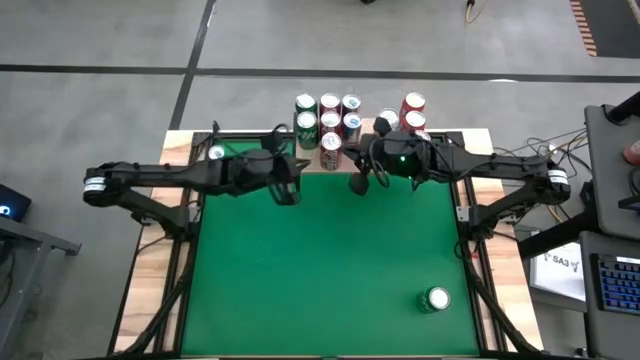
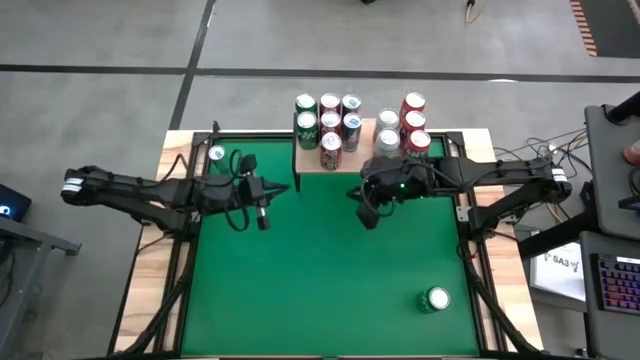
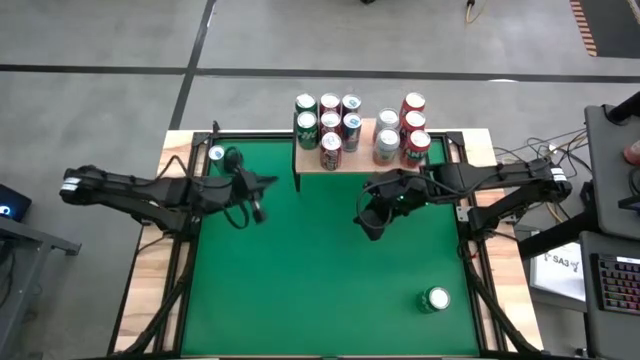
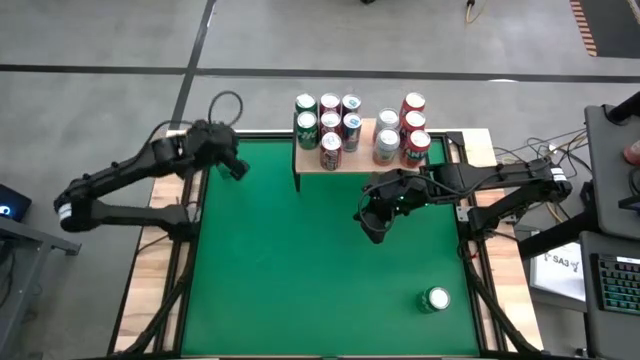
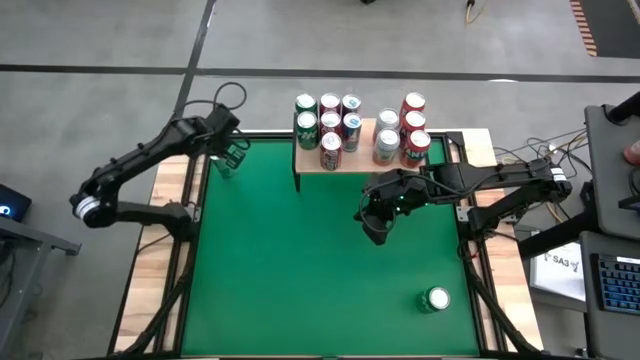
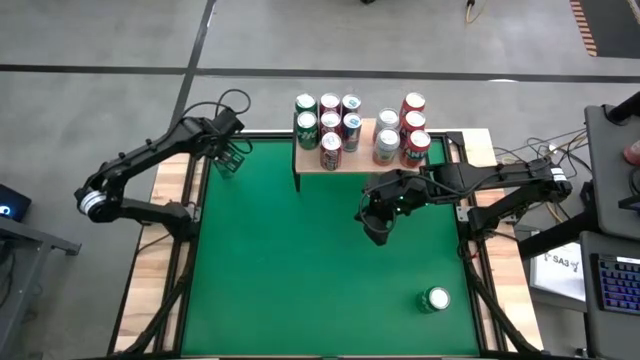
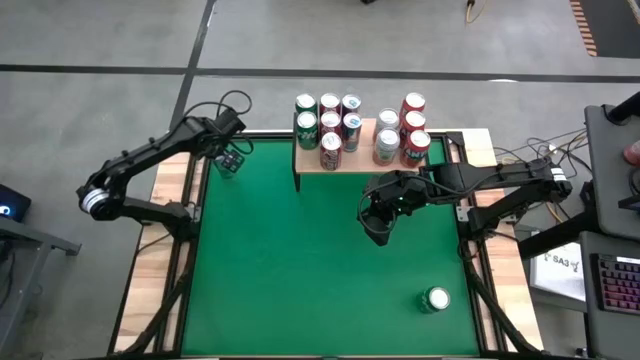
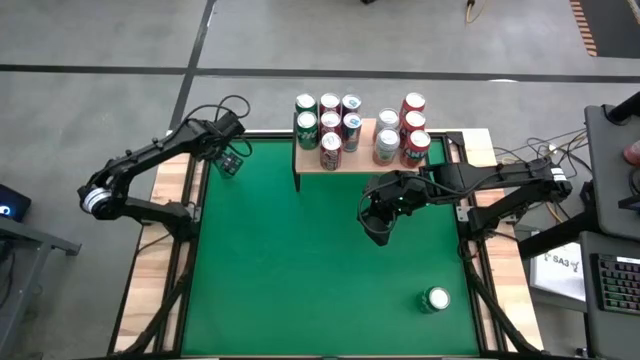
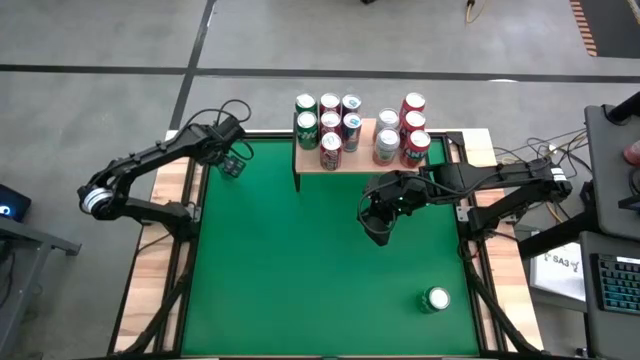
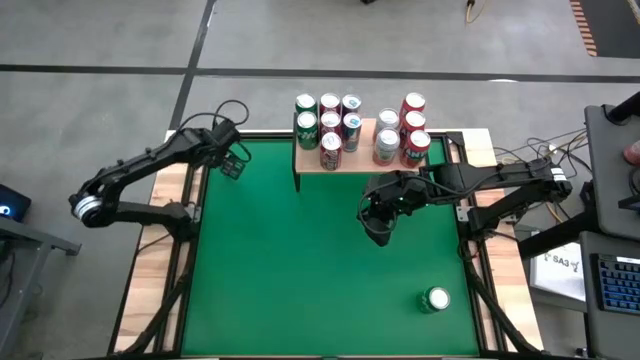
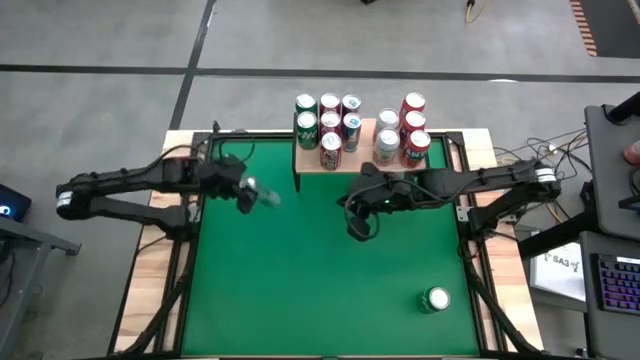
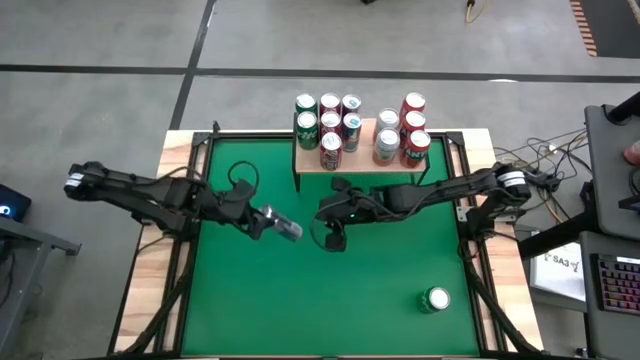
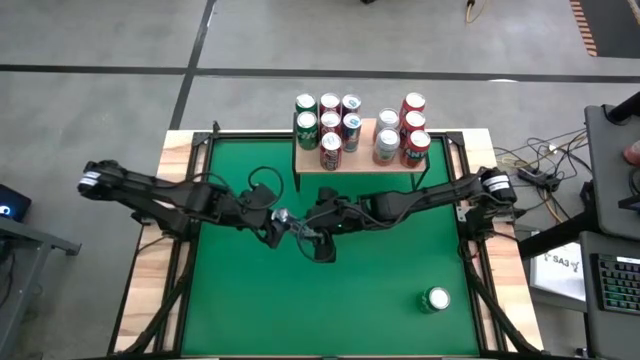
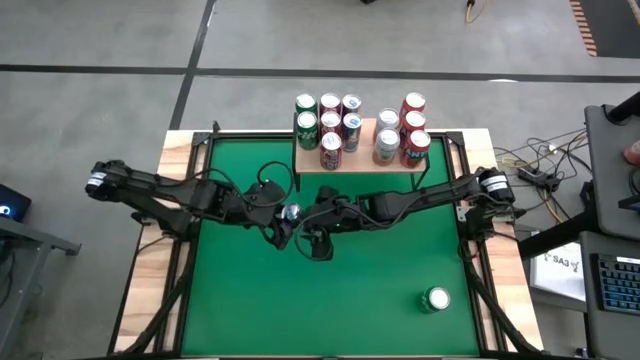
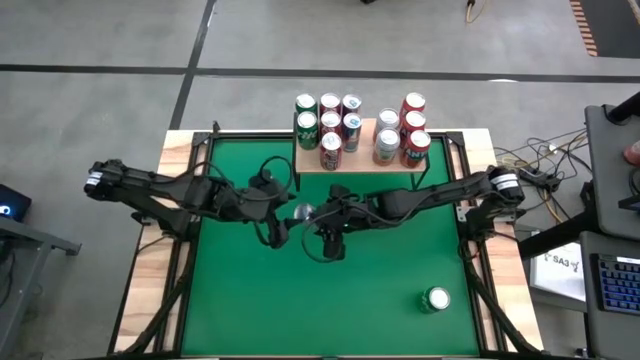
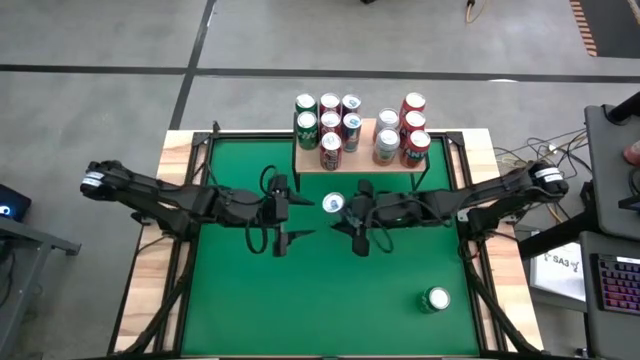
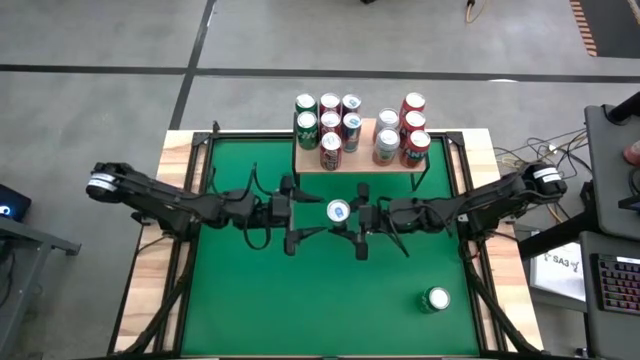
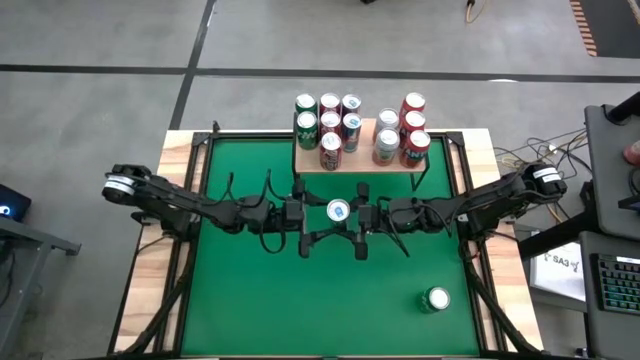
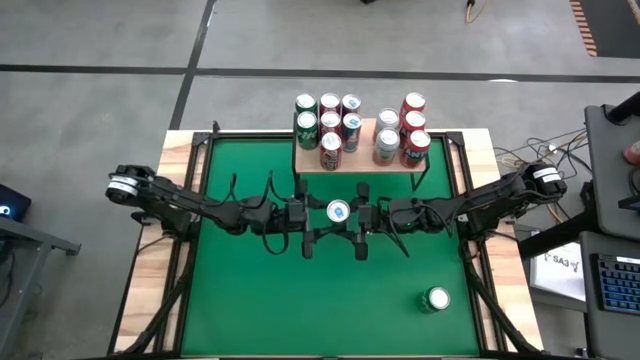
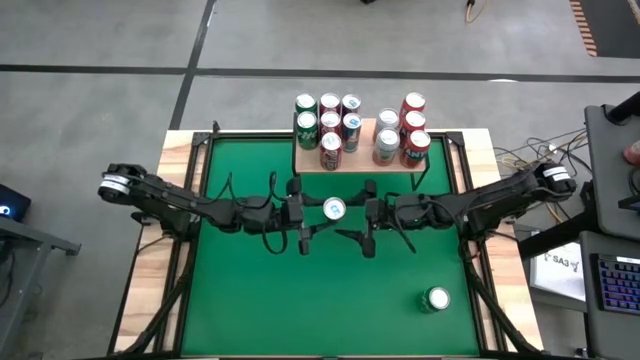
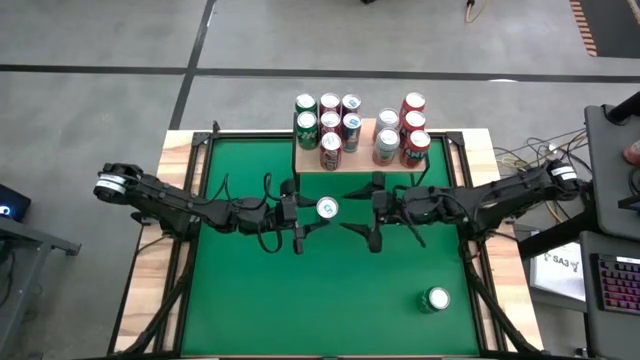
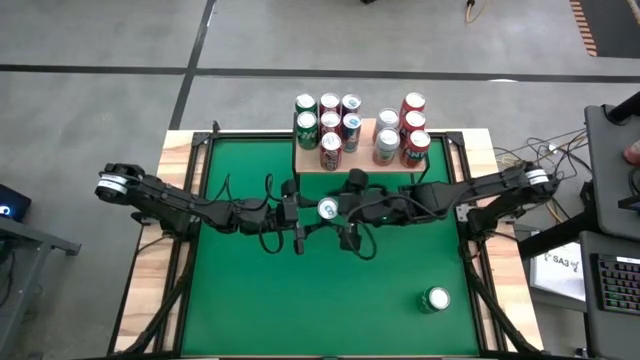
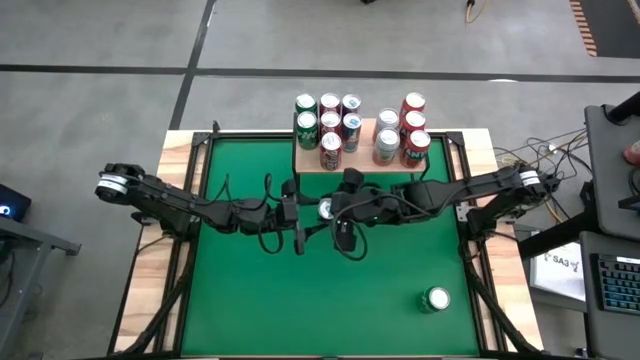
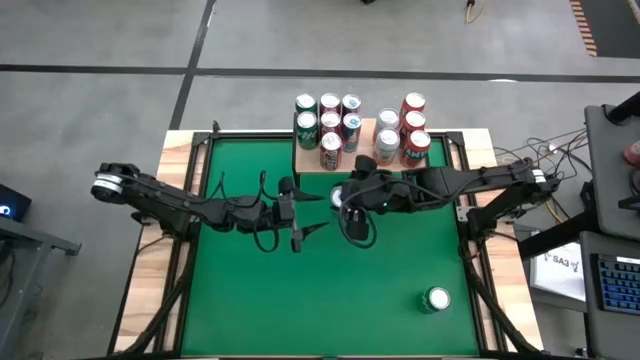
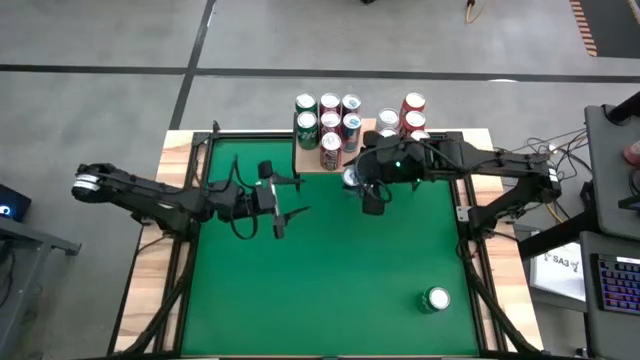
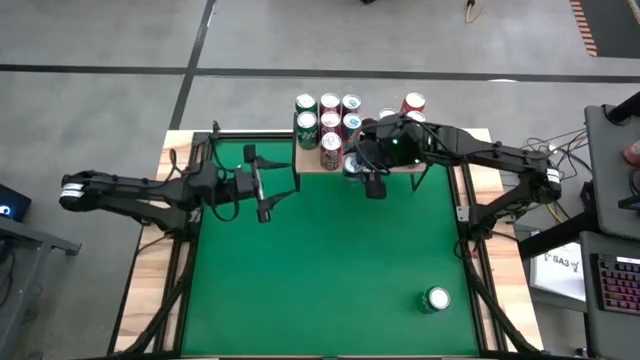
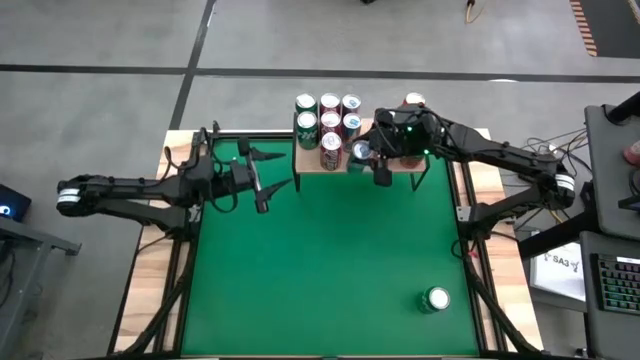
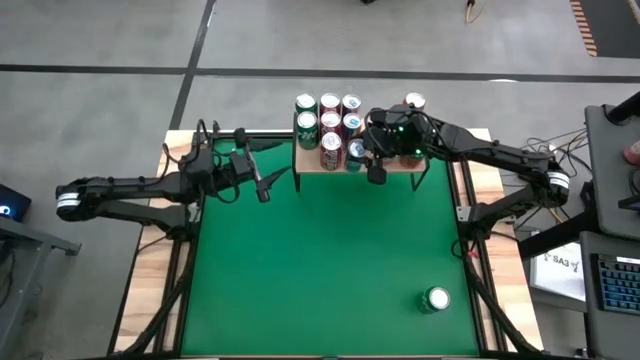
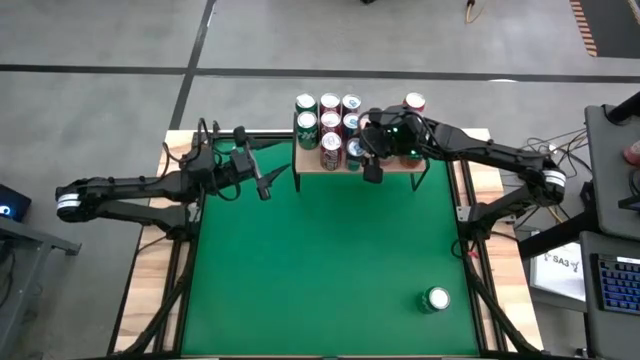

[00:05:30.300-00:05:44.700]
Task: Place canned beverage on shelf
Put the blue soda can aligned with the blue soda can on the shelf

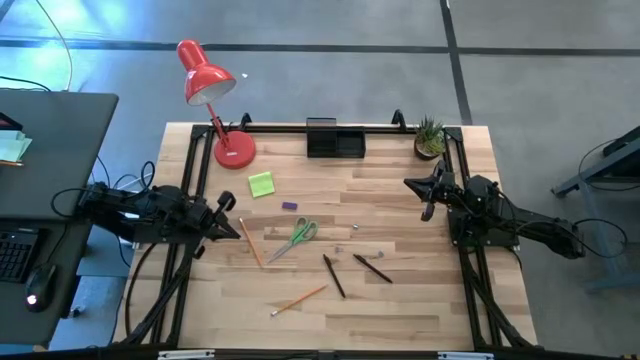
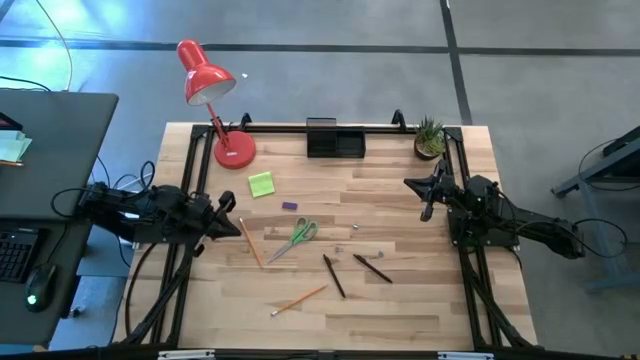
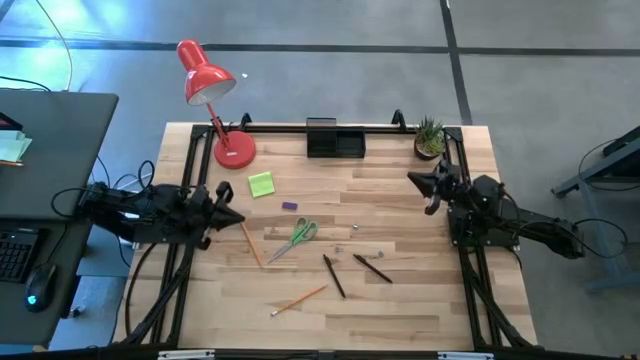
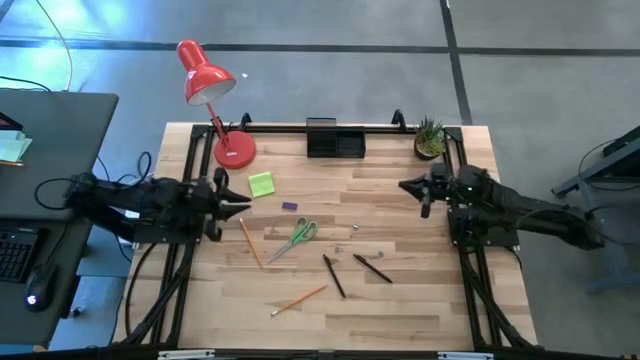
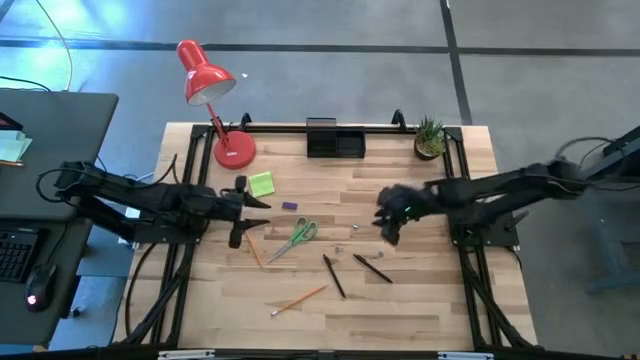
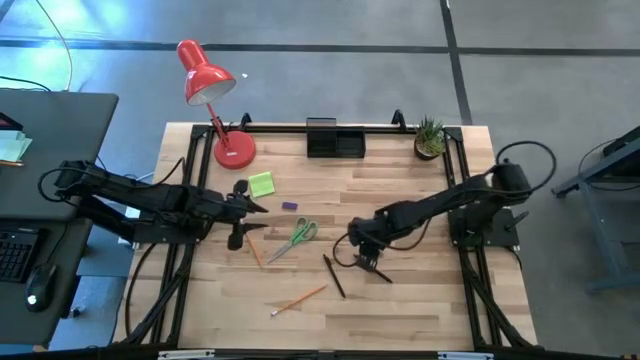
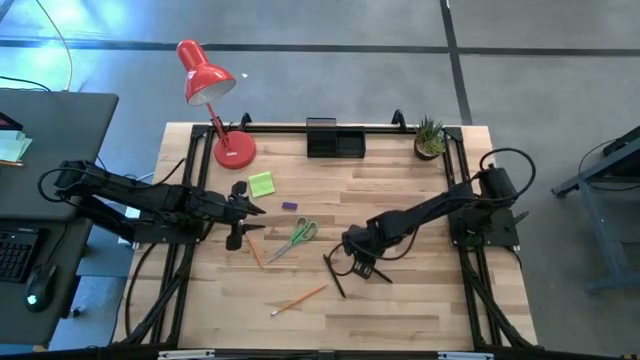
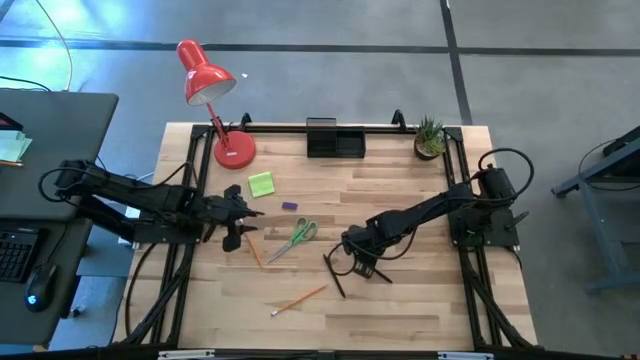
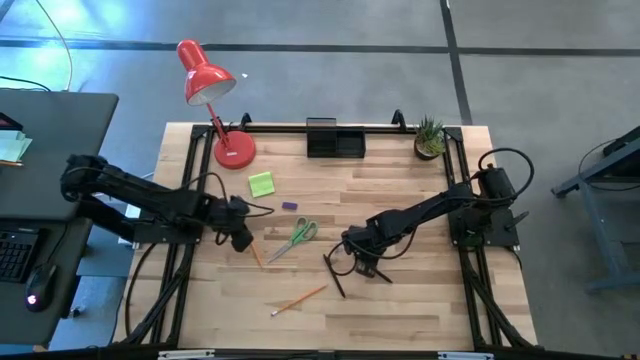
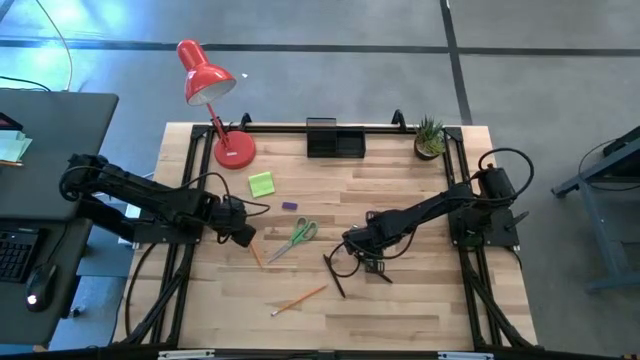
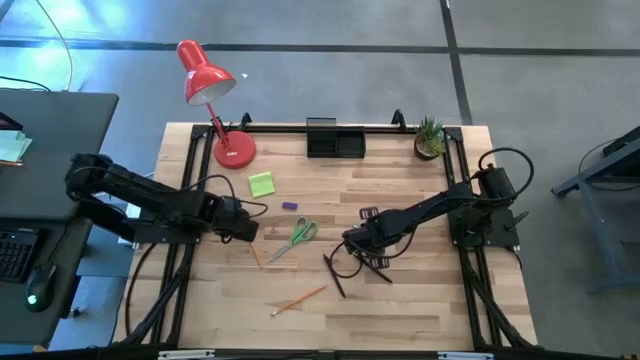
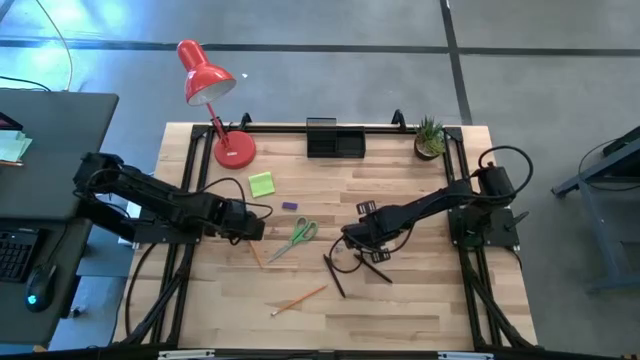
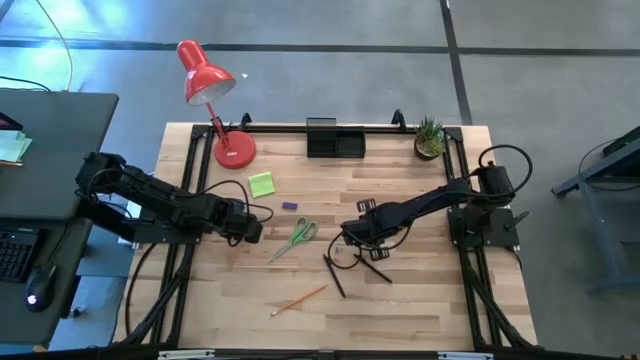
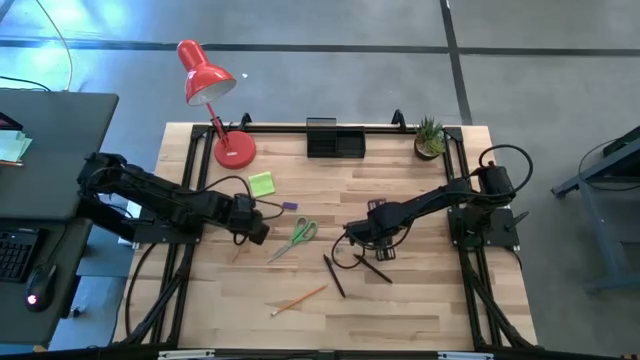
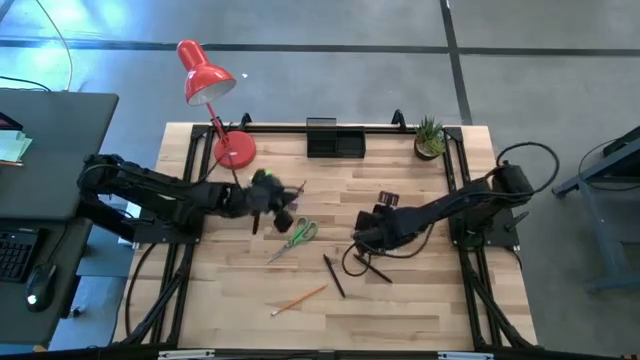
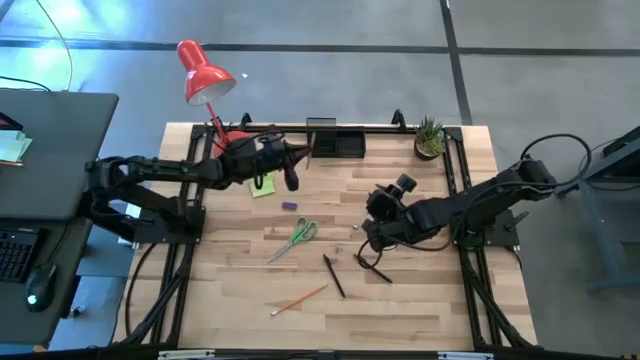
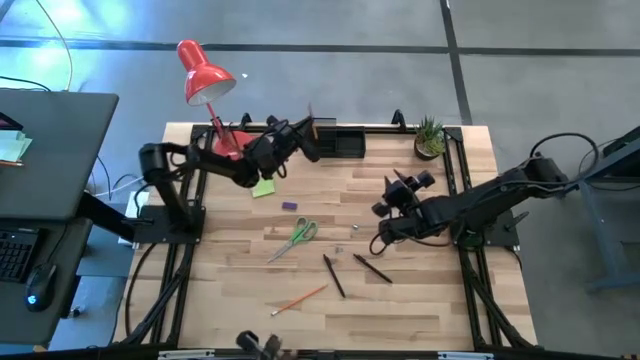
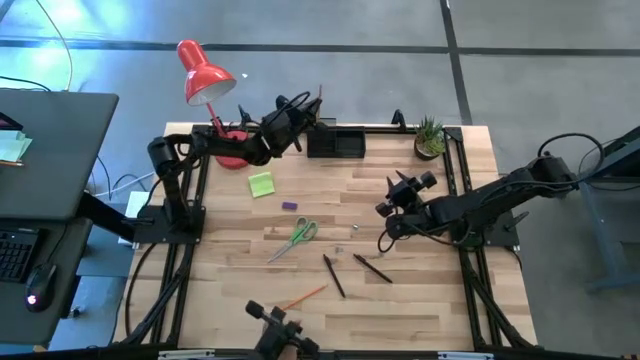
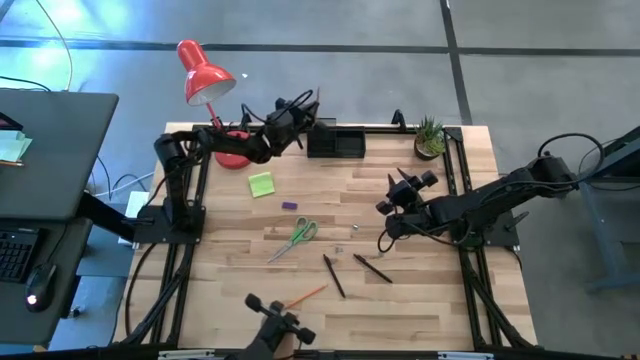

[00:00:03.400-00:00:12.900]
Task: Pick and place office supplies into organizer
Put the top pencil into the desk organizer
